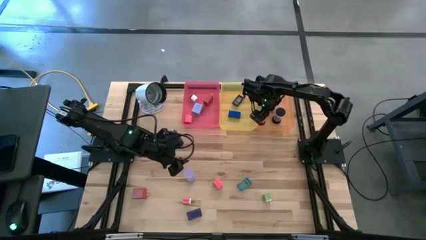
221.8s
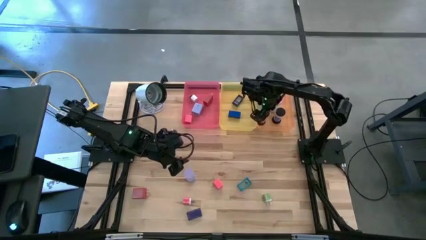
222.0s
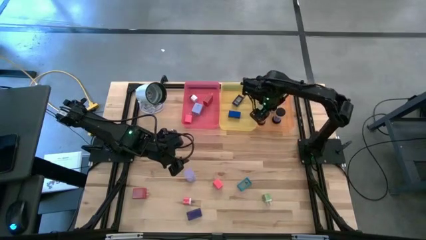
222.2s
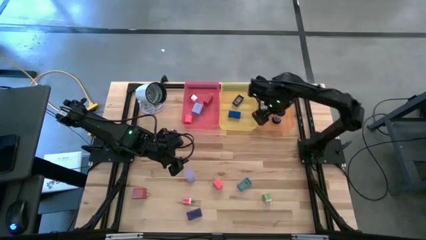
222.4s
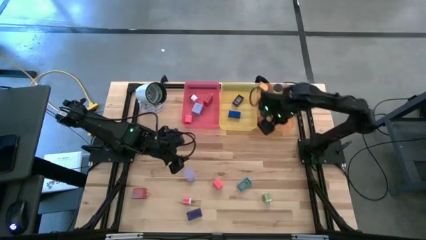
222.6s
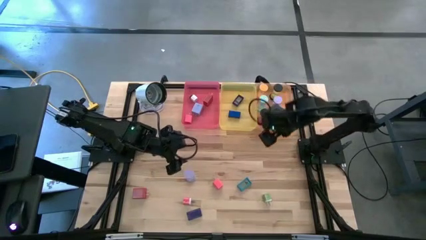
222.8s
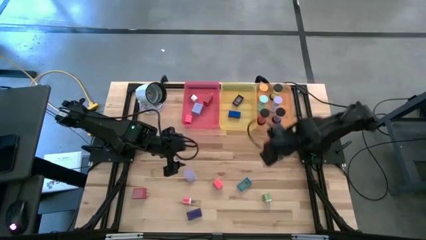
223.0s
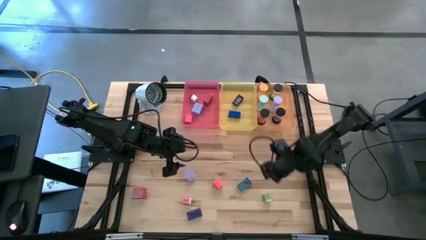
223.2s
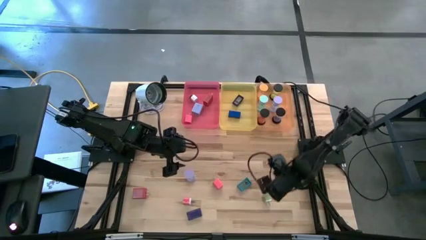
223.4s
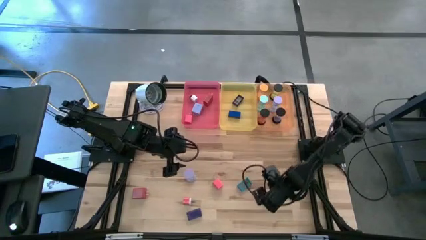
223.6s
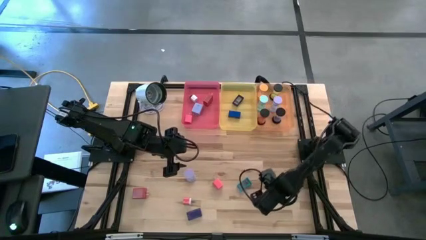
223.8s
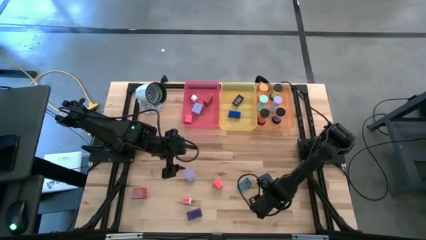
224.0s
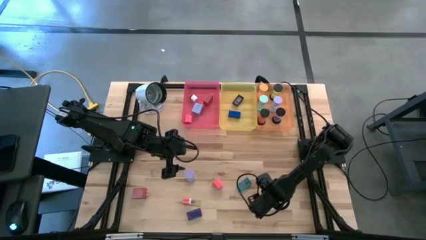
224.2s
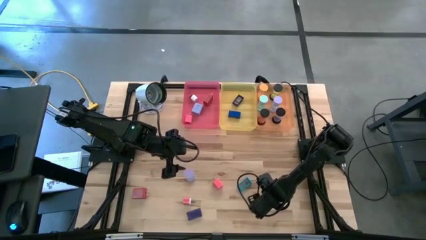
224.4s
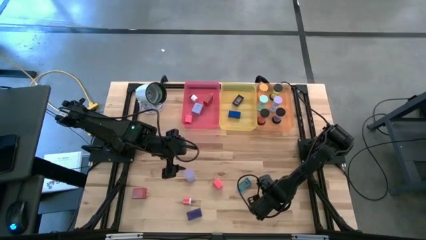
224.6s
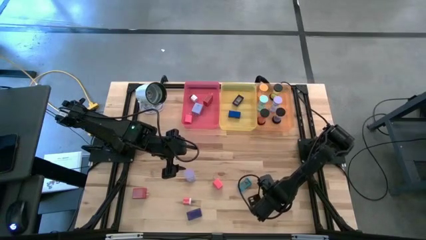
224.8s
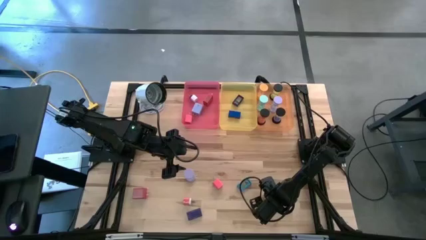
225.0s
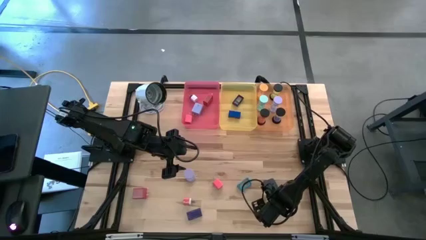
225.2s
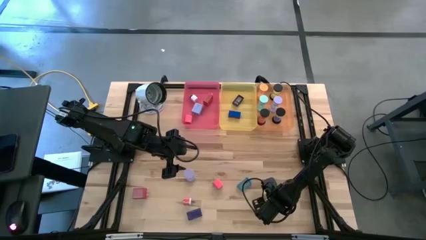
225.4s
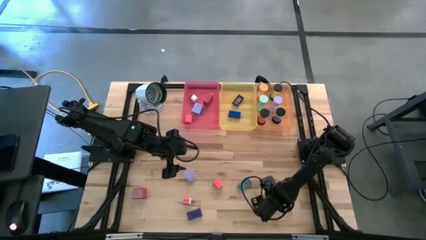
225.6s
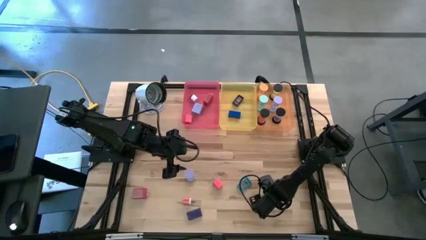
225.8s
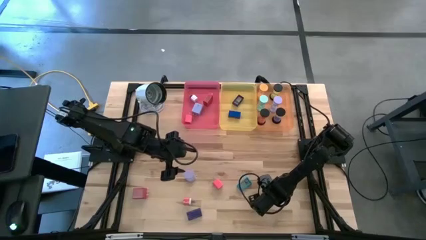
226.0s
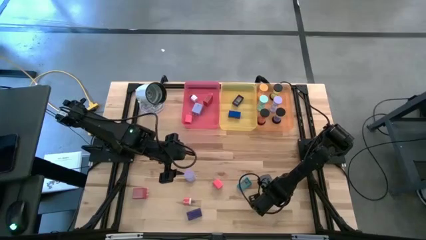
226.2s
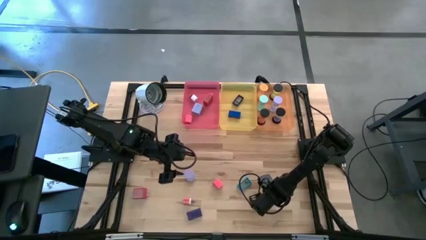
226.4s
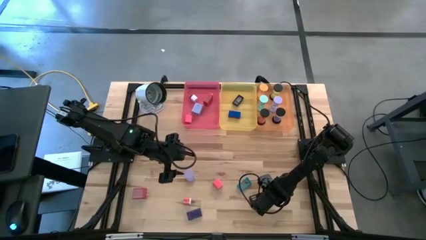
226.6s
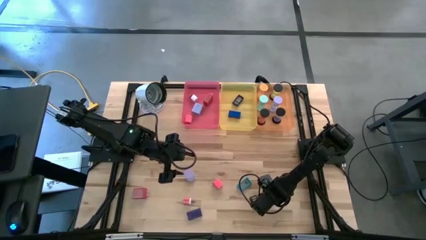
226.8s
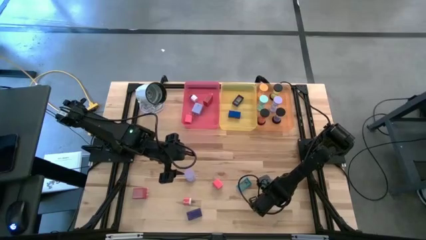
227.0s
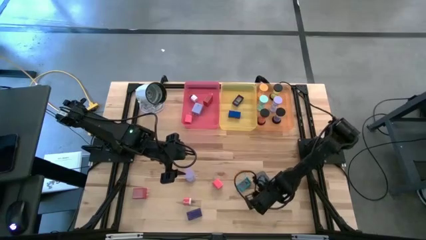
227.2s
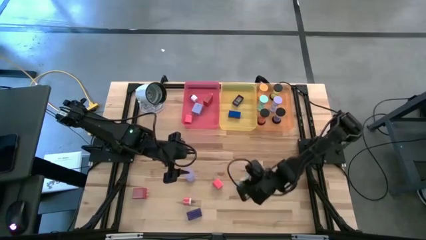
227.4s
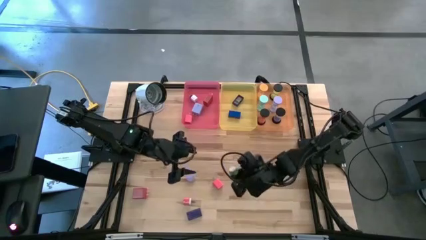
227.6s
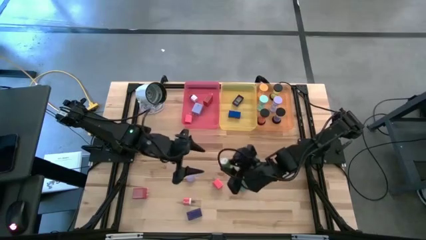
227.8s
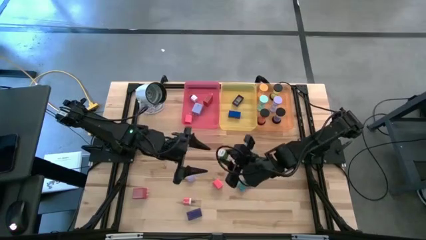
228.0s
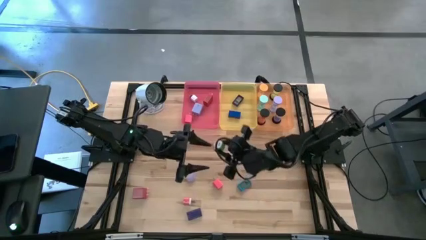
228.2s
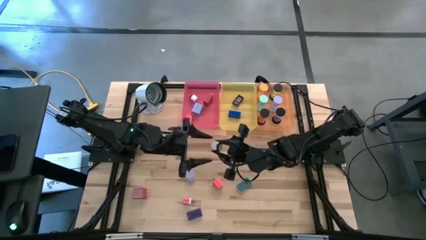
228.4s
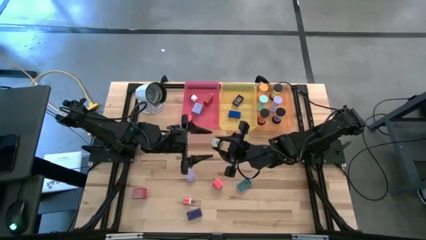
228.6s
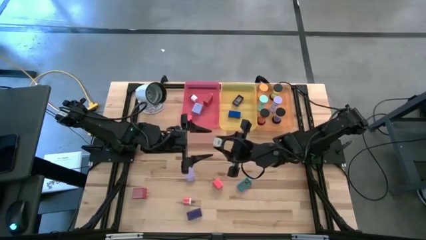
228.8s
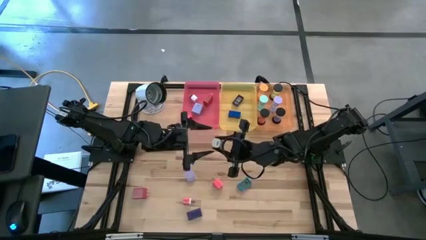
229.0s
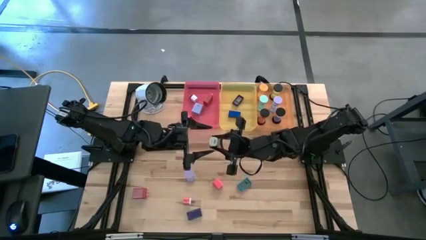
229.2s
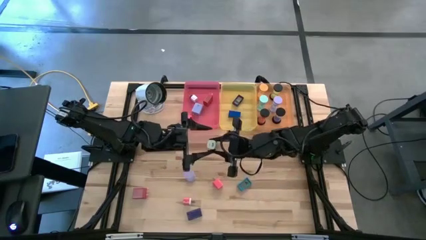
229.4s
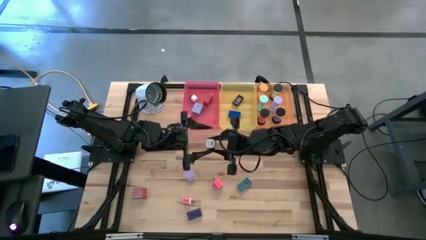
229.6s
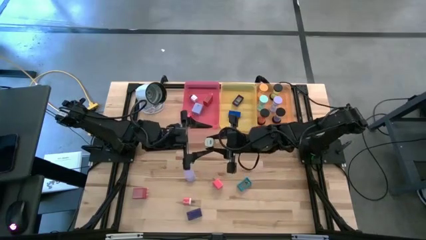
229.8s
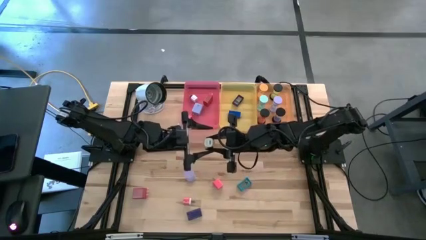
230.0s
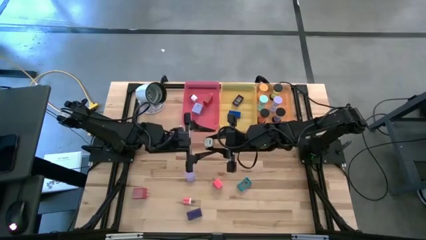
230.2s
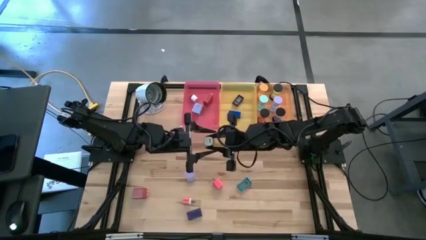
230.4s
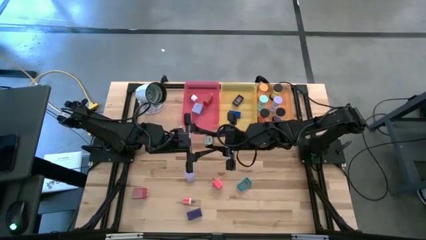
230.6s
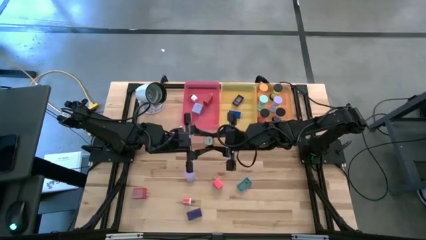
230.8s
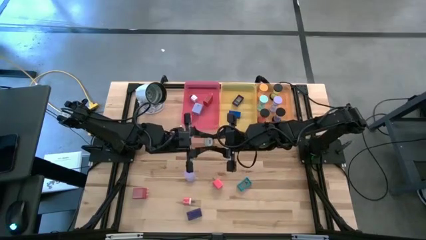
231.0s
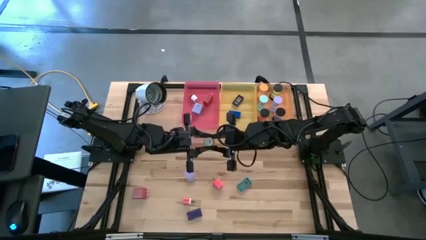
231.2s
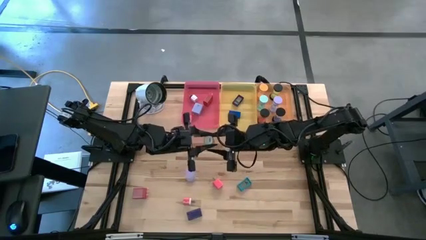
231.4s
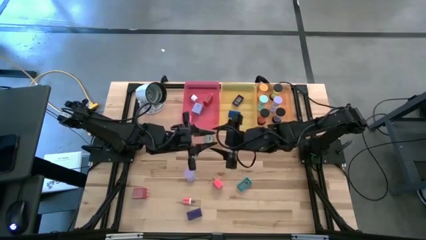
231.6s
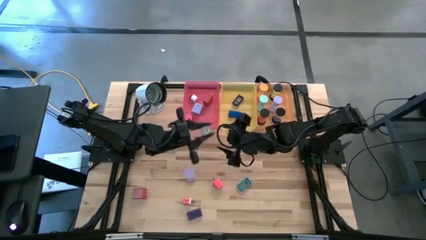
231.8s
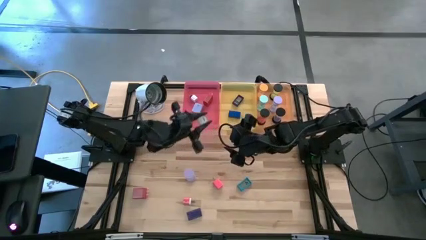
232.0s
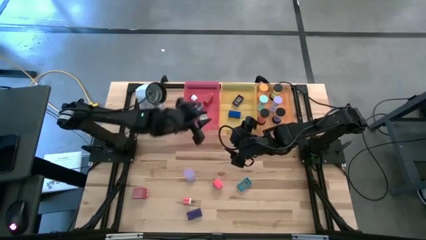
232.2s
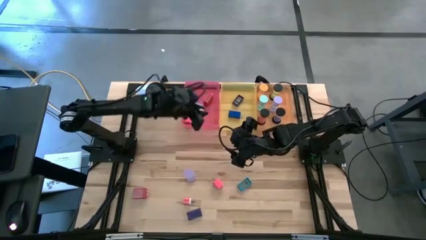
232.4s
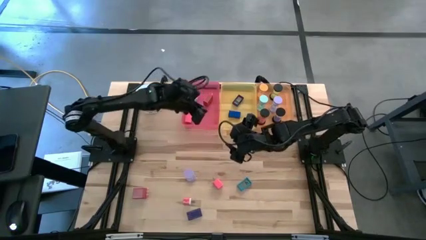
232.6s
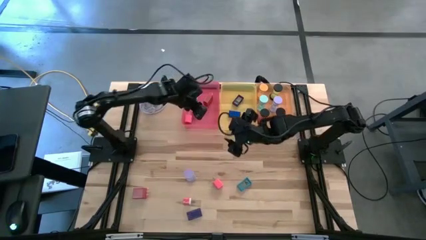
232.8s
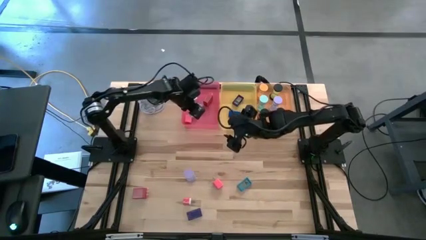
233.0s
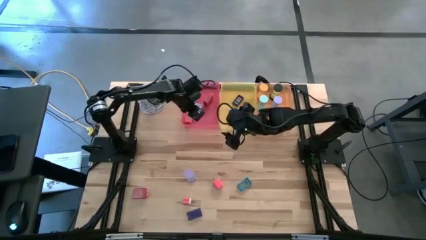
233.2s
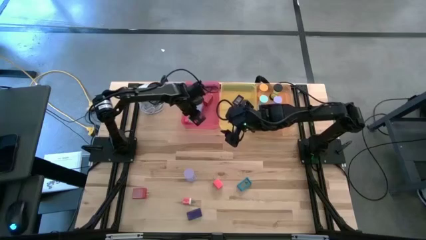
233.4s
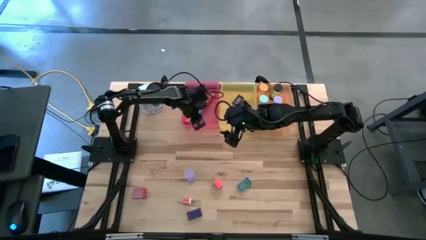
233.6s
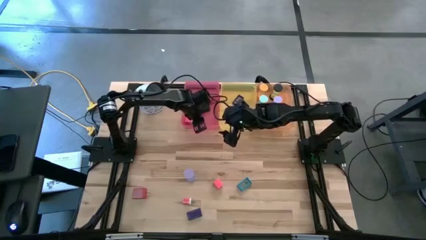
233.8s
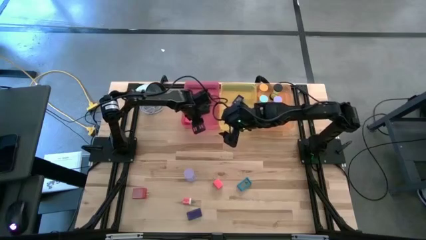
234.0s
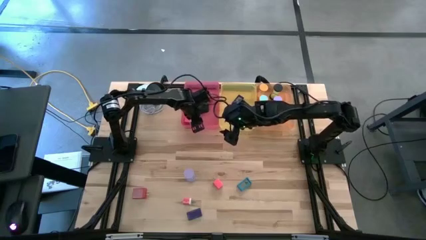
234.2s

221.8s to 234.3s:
Task: Pick & Place Office items
Put the green charger adapter into the red bin

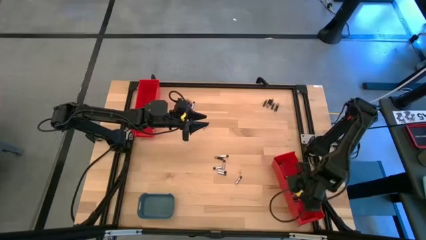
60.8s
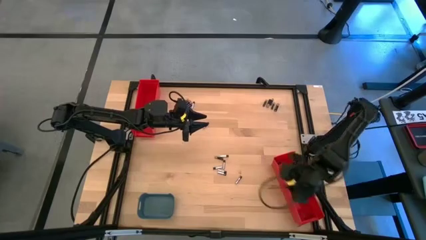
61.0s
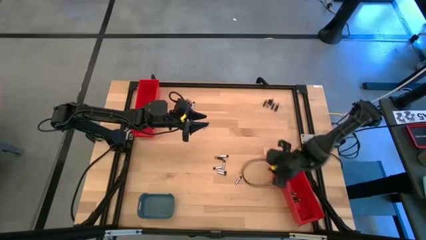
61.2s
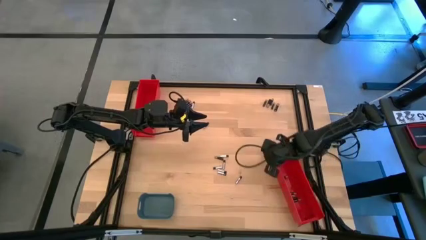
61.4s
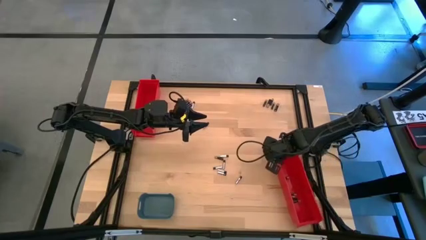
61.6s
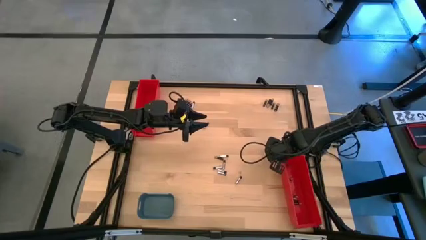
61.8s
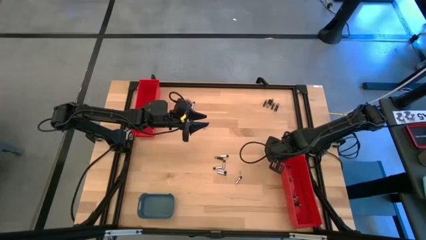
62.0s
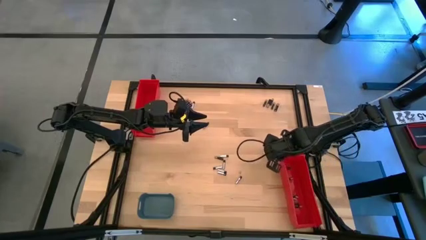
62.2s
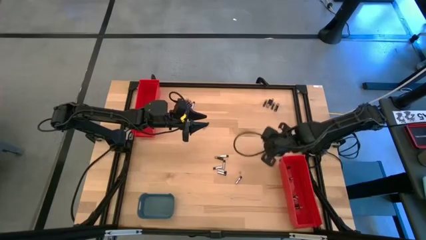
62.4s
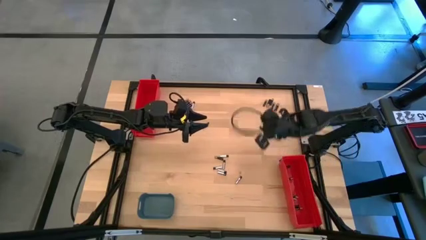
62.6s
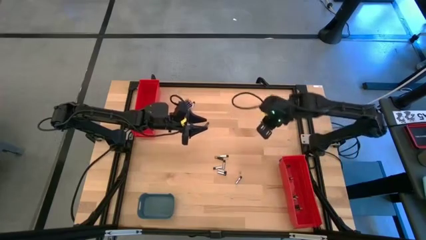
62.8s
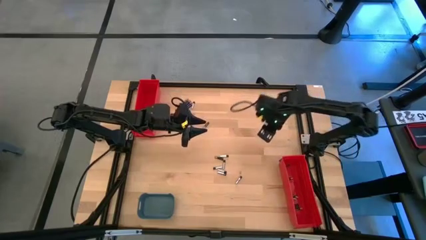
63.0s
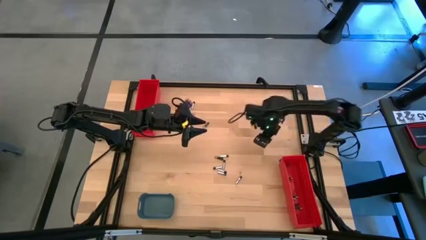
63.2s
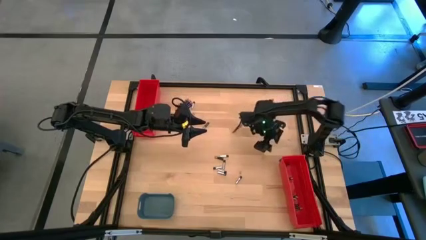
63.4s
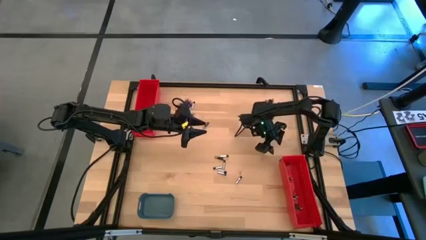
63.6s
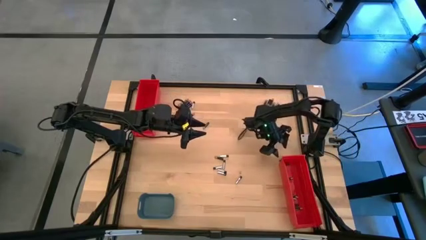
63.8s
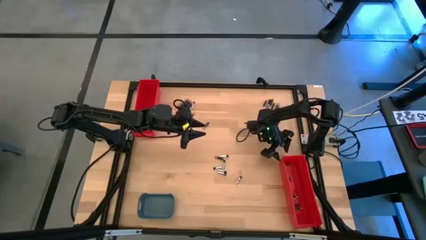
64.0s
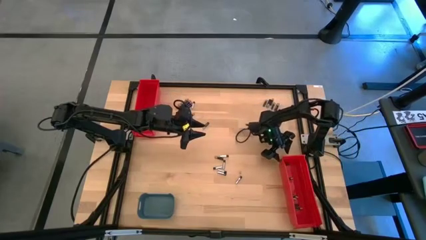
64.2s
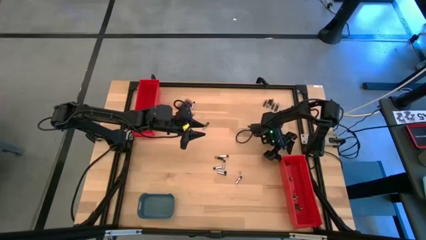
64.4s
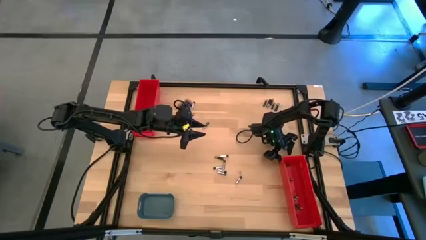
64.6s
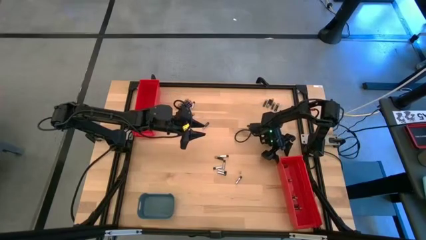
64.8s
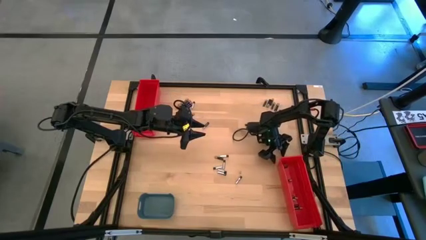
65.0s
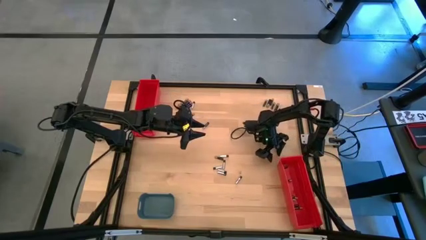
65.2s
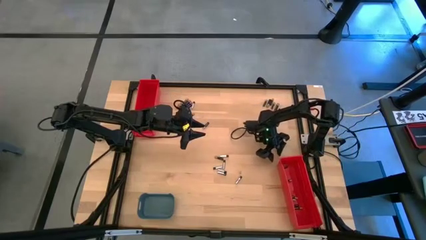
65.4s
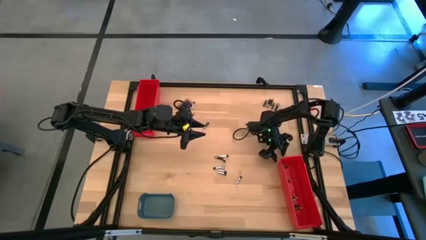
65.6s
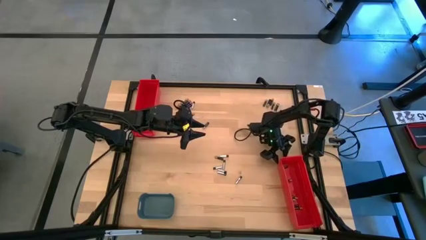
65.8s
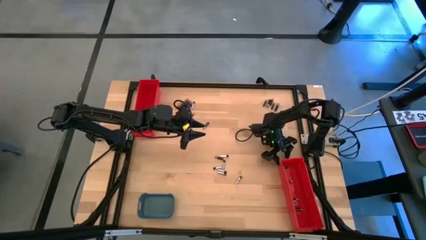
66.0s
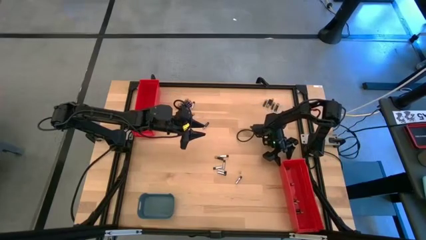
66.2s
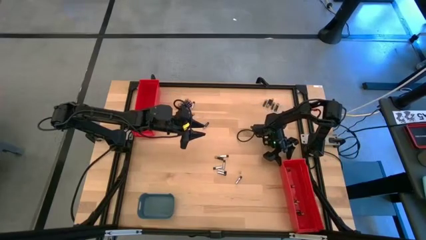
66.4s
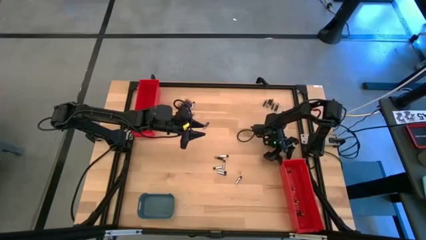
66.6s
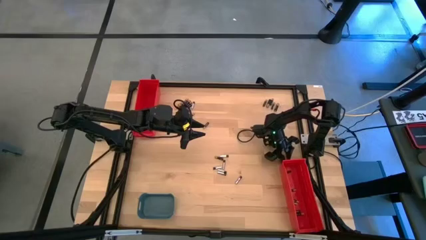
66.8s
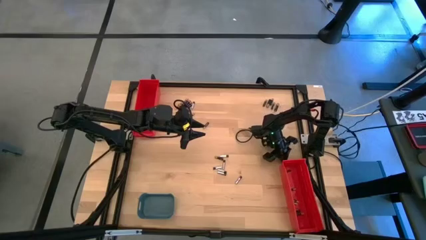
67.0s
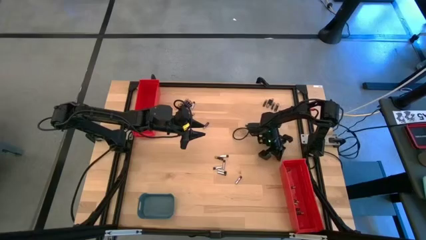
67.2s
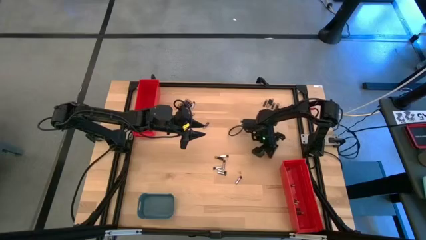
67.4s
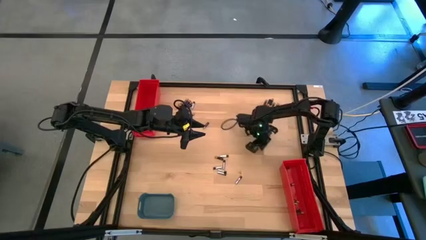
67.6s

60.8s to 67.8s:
Task: Sort batteries
Put the small black battery into the bottom red bin
